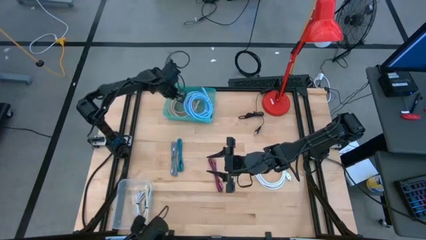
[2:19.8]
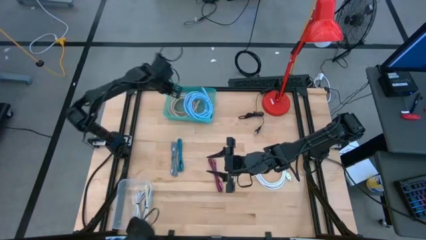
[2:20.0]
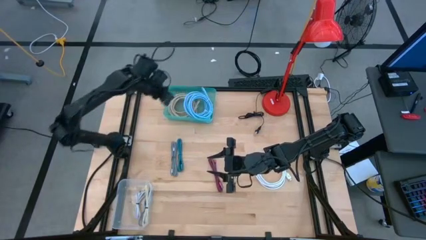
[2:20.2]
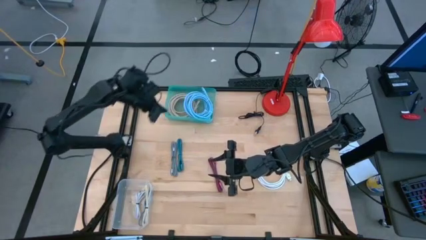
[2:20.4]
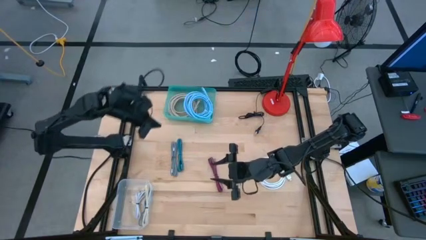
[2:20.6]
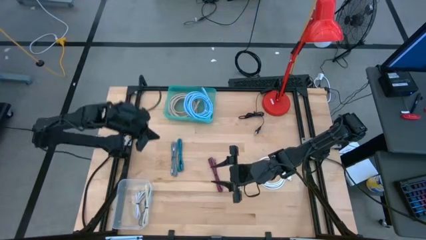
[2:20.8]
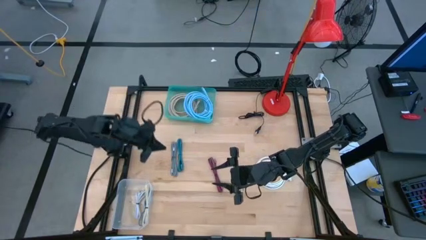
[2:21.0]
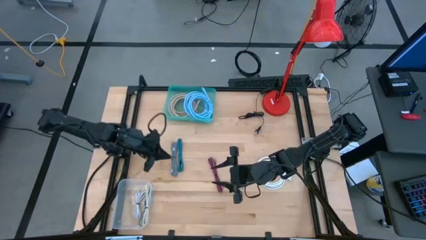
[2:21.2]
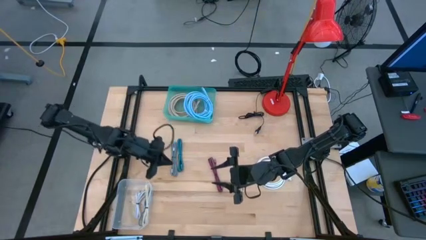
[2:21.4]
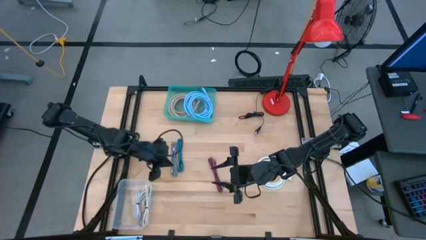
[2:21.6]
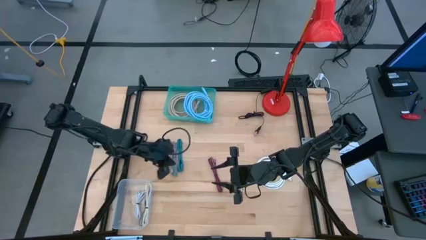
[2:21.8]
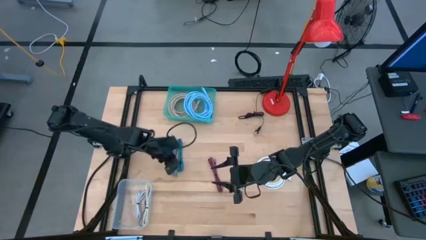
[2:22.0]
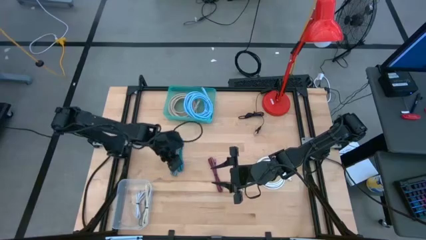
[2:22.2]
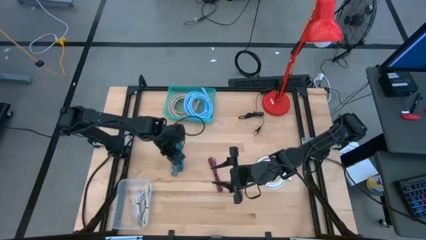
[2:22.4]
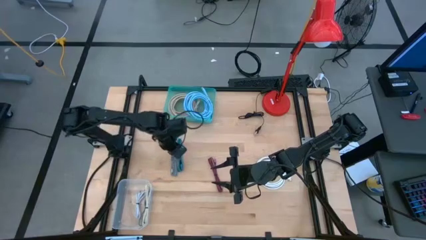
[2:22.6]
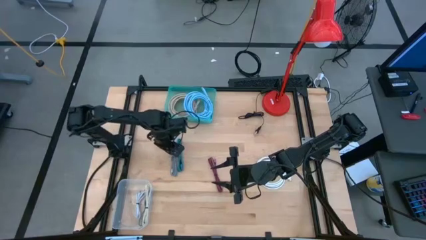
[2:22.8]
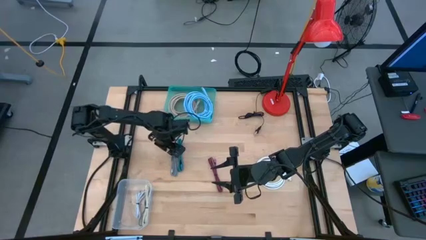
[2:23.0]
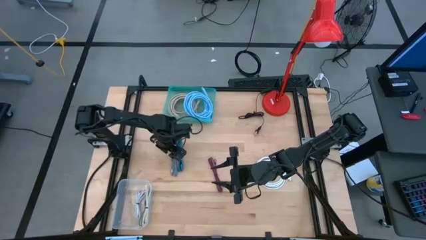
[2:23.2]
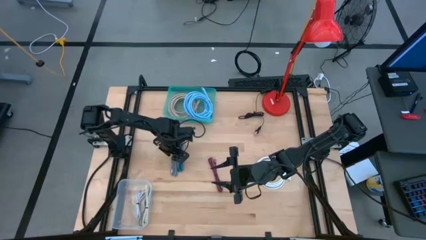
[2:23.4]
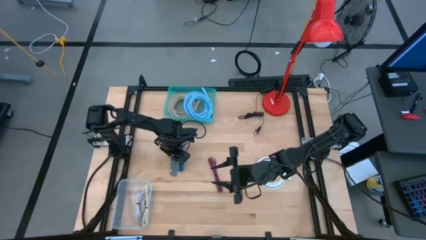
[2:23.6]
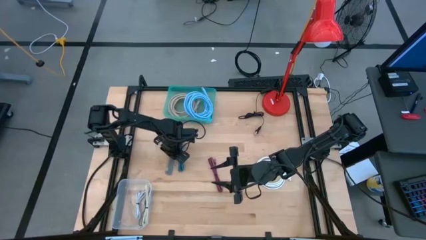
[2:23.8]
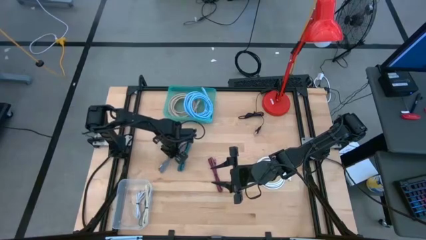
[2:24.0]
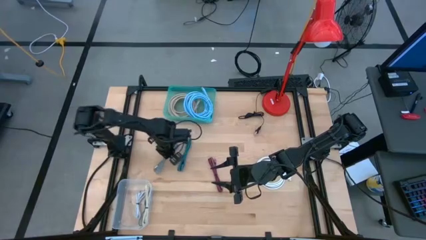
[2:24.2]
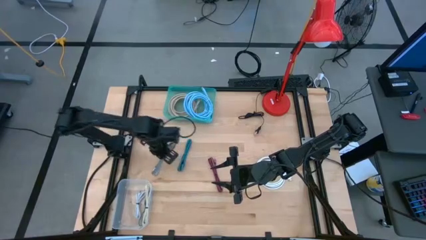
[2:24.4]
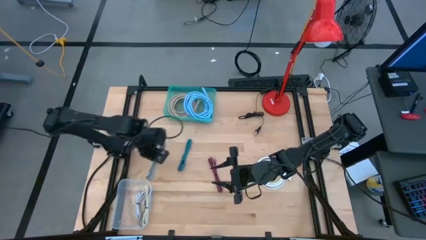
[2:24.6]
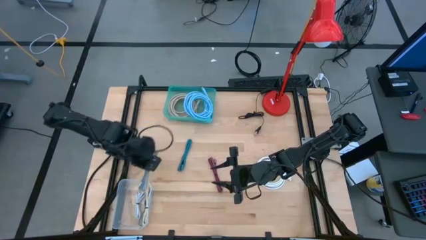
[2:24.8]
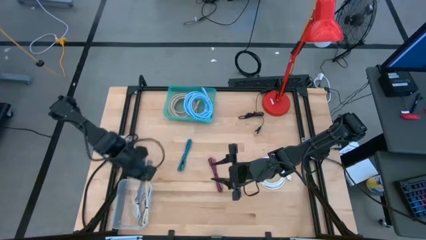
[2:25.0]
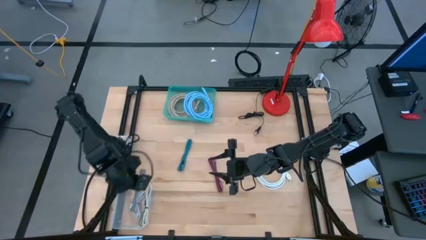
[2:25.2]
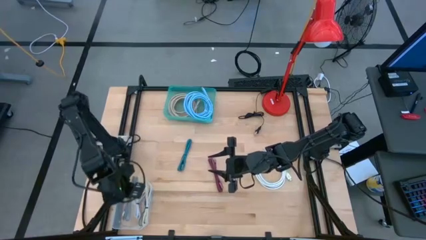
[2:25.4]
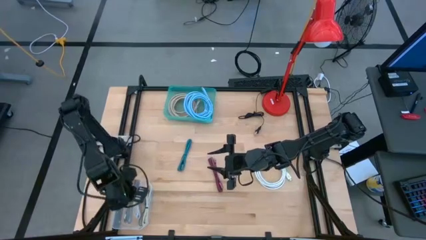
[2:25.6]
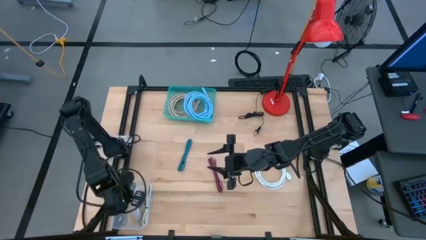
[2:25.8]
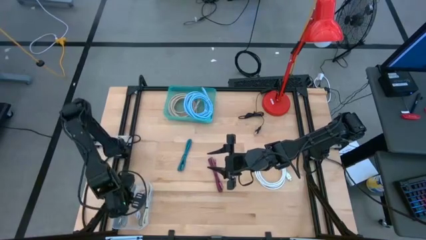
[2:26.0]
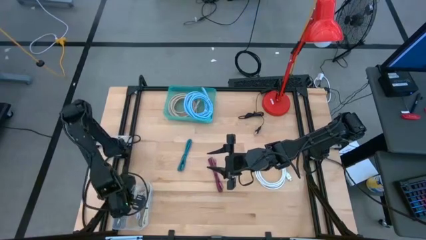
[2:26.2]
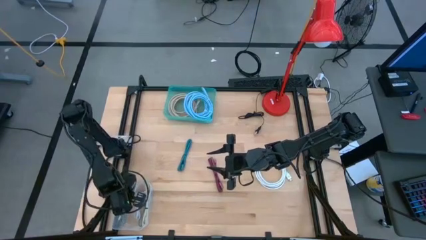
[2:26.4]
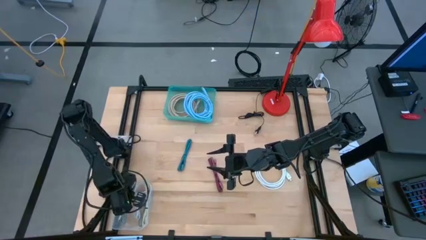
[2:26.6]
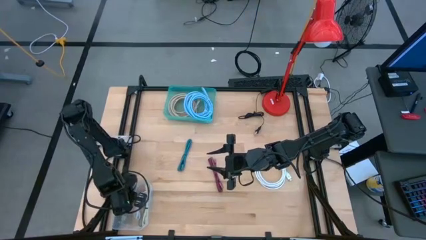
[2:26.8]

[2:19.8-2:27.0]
Task: Pick & Place USB Port
Put the white black charger cable into the transparent bin

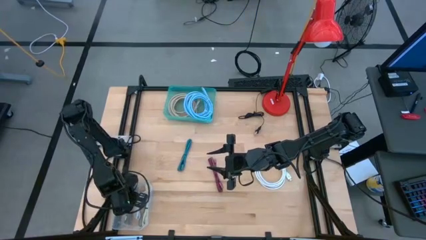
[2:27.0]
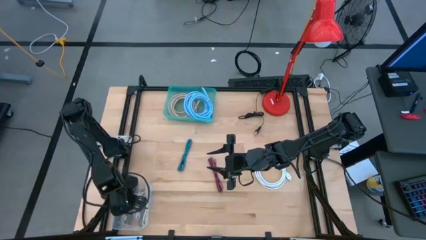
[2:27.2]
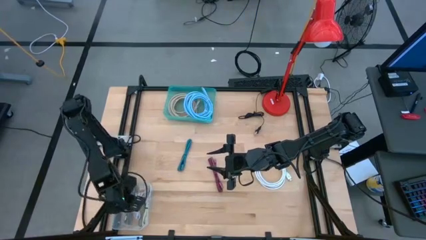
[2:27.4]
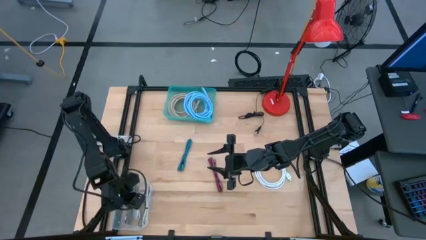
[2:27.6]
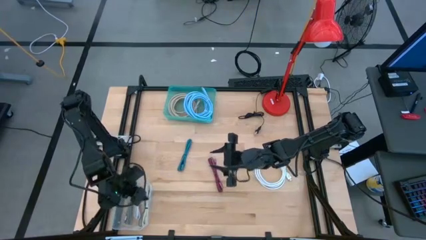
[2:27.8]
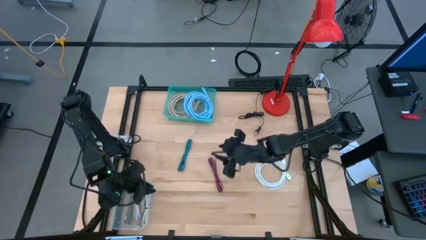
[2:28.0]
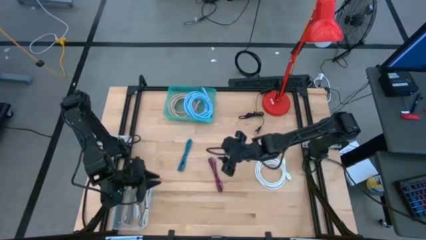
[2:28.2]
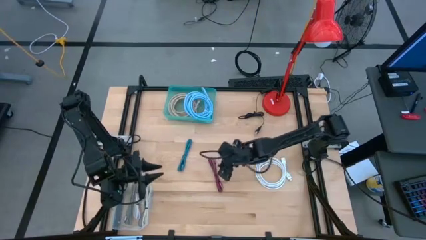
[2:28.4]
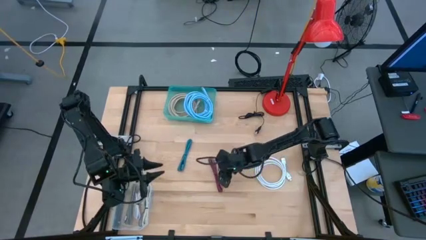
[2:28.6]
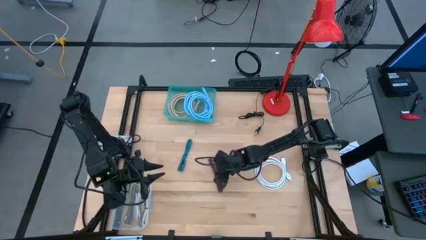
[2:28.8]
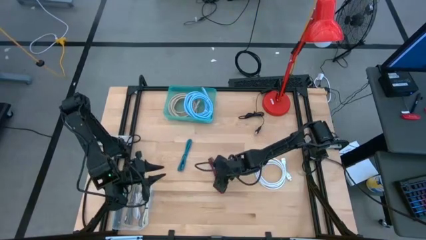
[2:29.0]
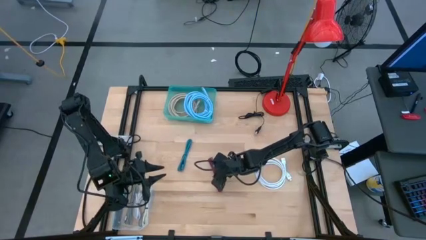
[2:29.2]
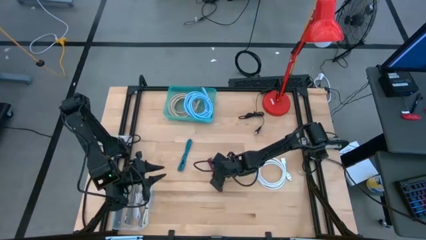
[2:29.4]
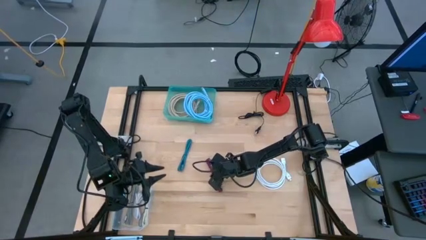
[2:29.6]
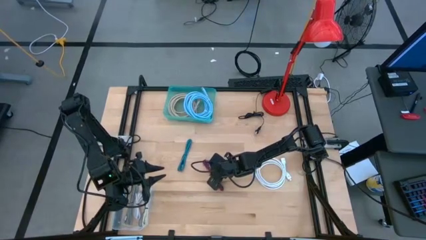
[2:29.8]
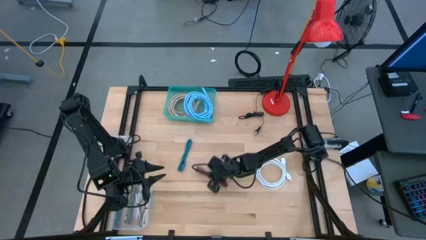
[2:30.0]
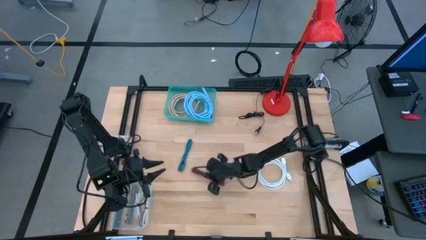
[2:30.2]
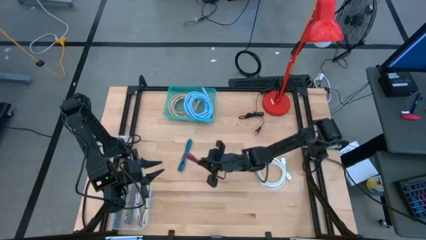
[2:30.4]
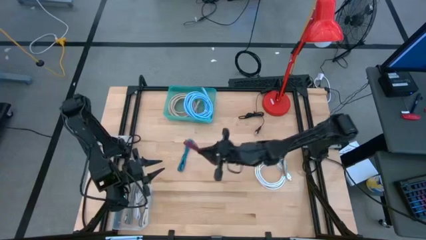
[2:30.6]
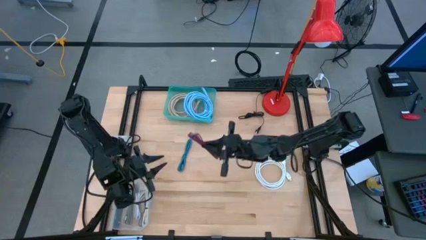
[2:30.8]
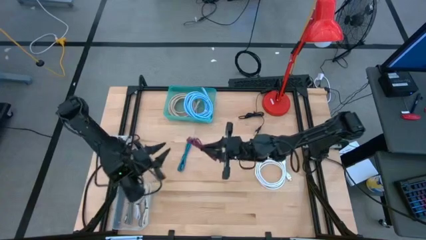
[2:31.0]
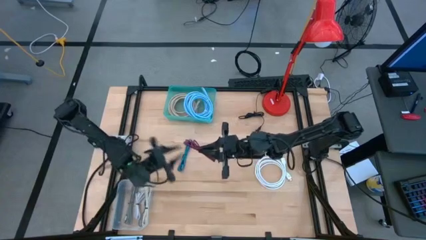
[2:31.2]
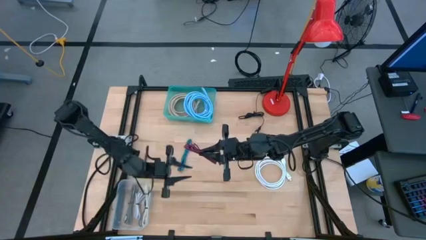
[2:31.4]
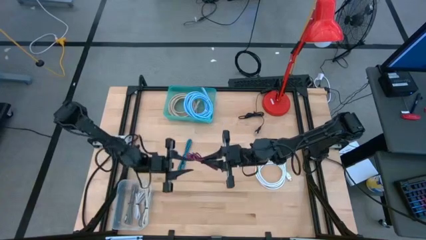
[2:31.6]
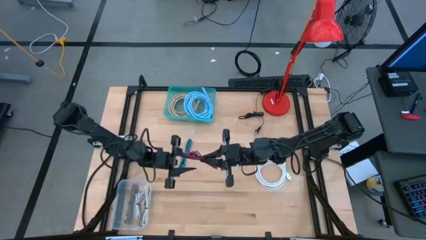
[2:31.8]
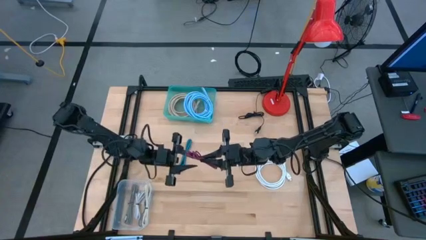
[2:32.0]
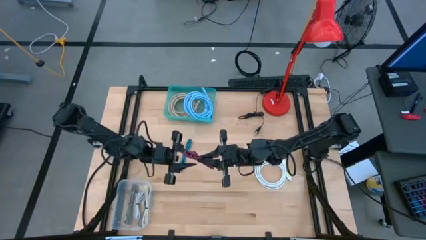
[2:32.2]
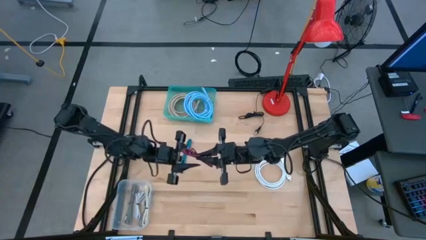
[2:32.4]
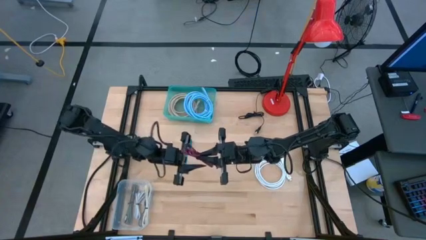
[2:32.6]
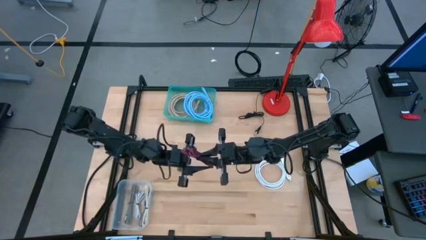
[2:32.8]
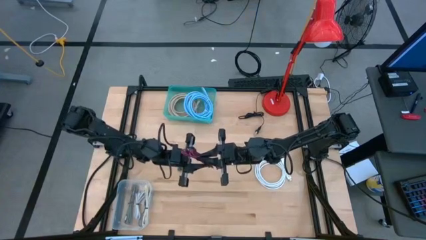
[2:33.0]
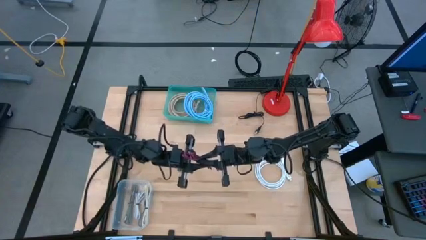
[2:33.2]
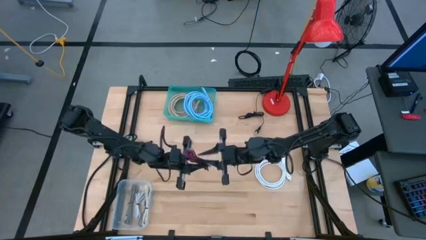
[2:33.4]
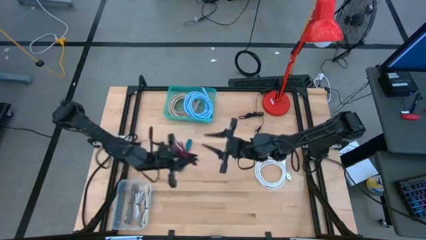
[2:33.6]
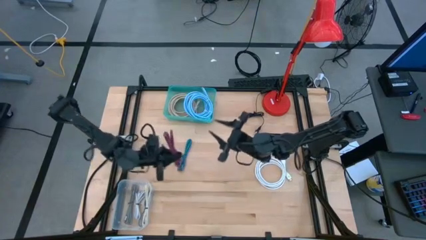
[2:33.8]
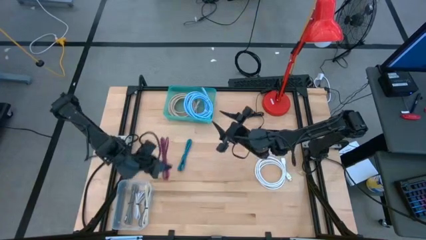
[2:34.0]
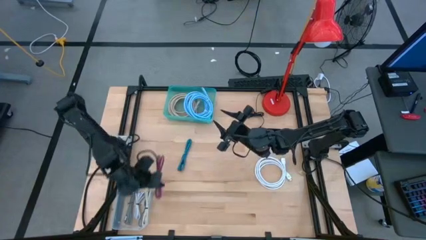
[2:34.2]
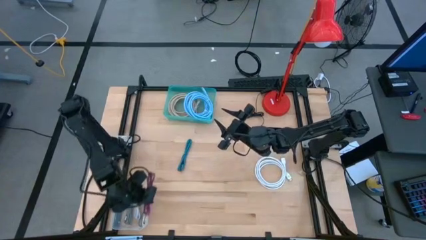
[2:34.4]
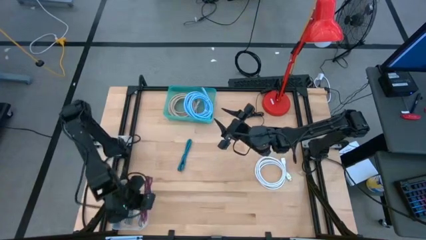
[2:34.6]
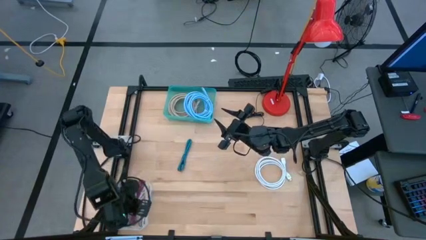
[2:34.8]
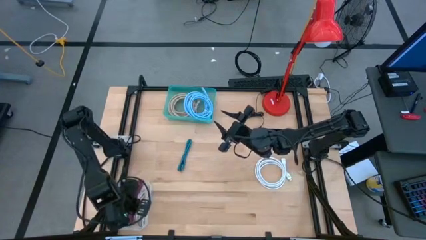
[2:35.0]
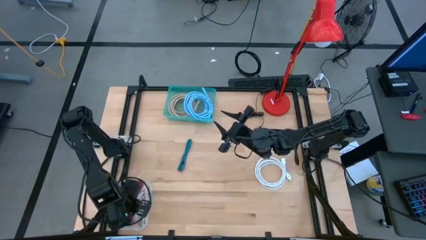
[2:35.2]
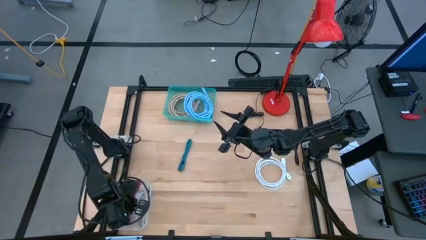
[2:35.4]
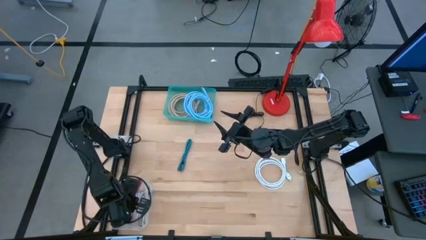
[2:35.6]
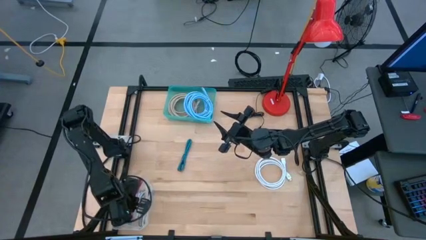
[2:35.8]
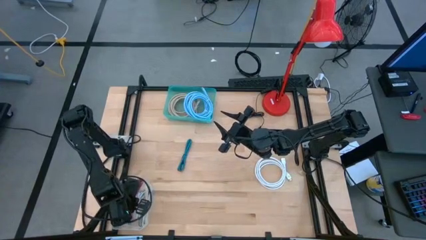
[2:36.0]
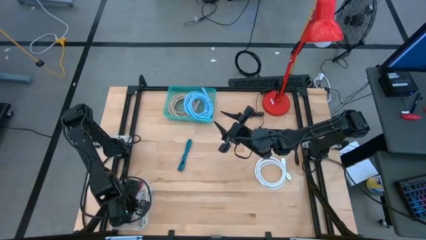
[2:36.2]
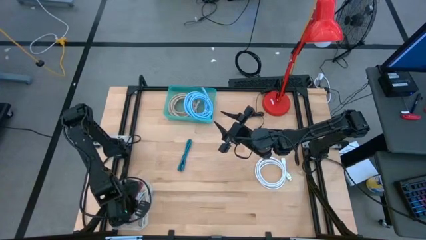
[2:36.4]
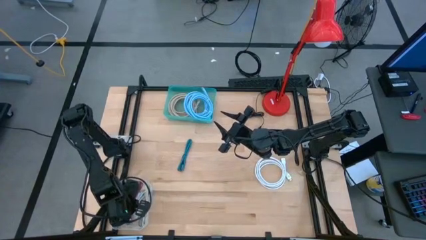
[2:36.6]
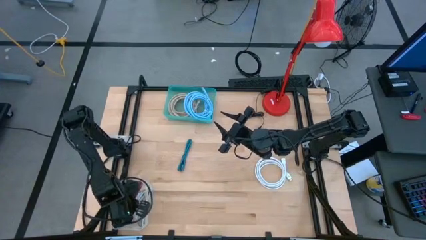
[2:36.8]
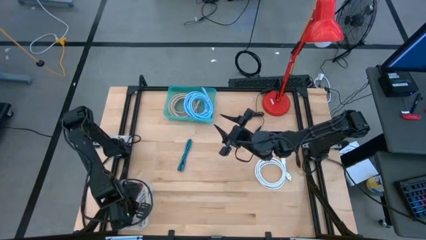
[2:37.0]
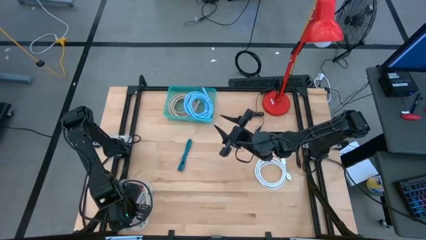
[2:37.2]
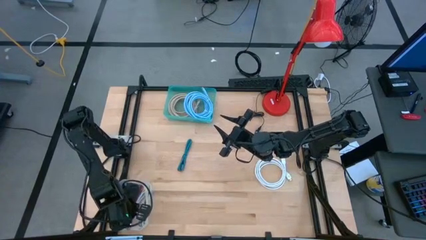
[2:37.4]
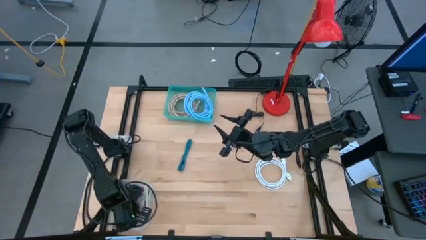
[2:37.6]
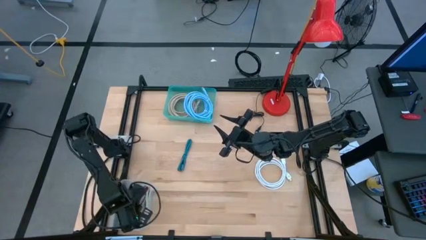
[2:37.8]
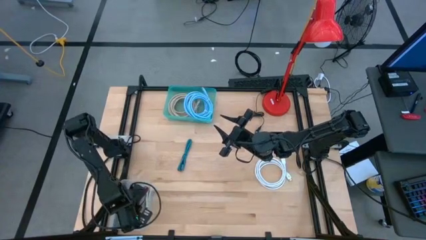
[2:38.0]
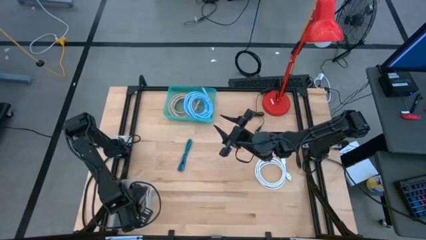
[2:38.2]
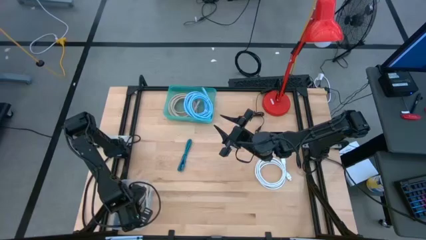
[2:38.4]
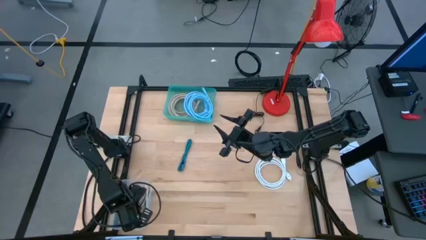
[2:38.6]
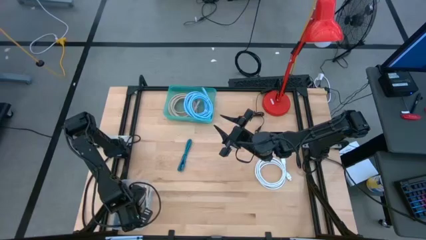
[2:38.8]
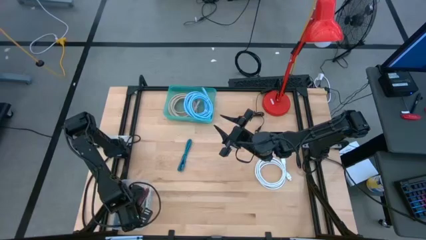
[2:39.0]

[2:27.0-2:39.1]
Put the pink black charger cable into the transparent bin
